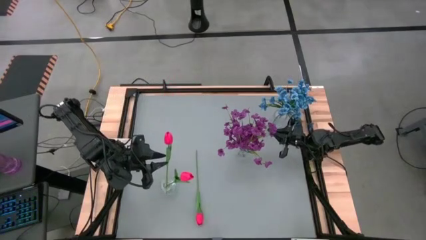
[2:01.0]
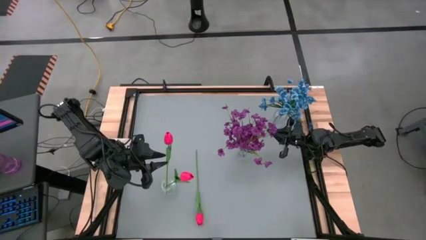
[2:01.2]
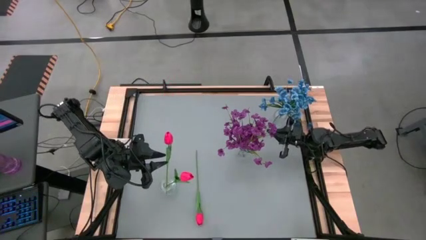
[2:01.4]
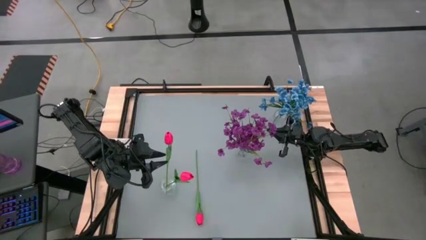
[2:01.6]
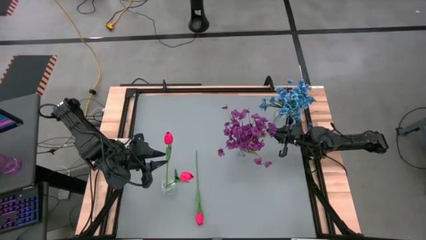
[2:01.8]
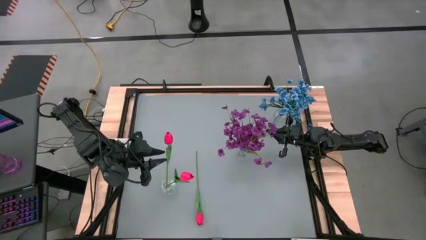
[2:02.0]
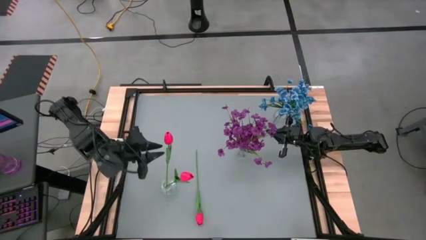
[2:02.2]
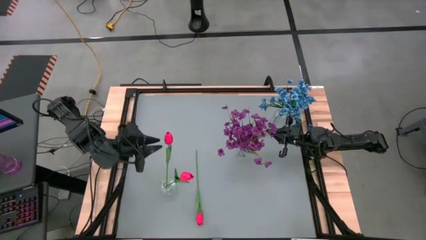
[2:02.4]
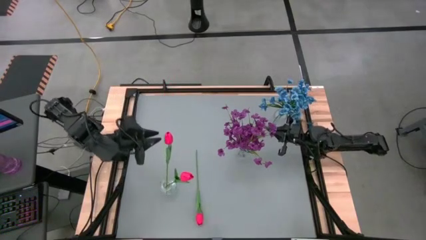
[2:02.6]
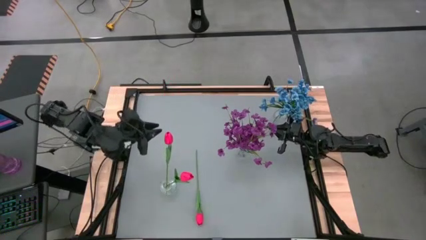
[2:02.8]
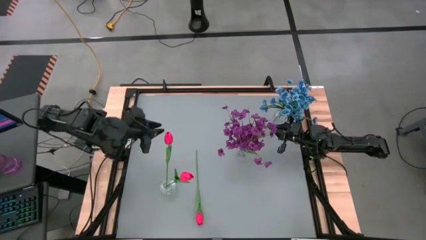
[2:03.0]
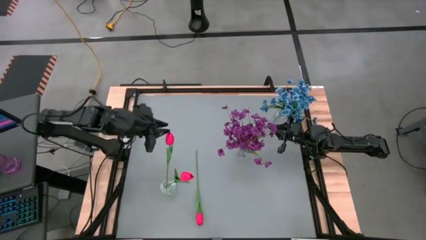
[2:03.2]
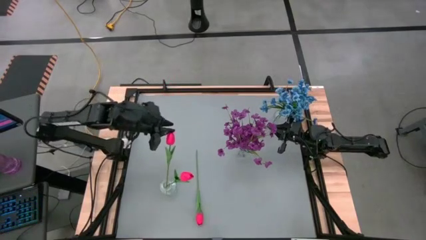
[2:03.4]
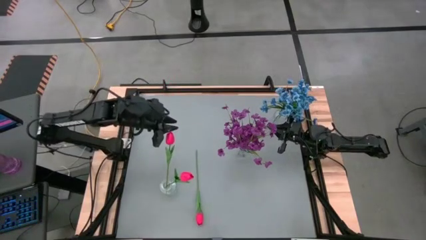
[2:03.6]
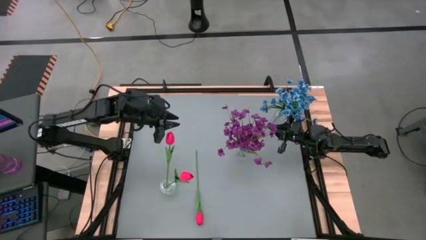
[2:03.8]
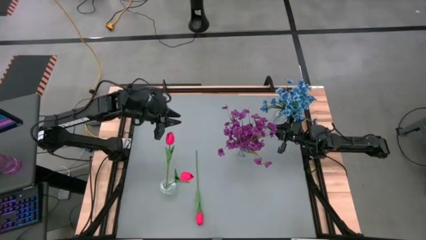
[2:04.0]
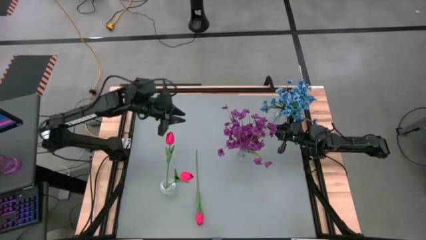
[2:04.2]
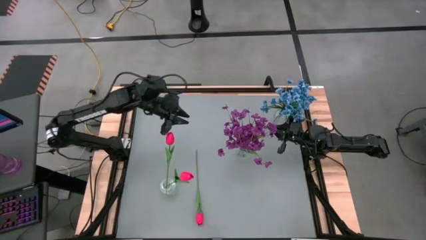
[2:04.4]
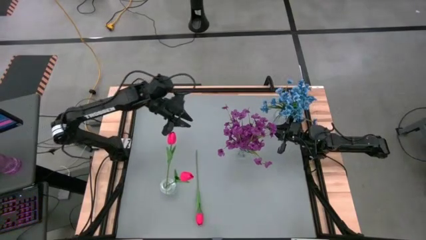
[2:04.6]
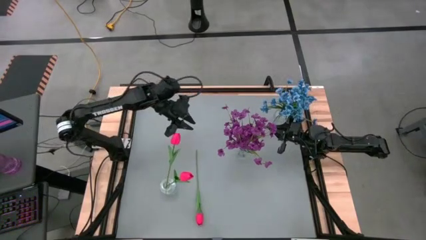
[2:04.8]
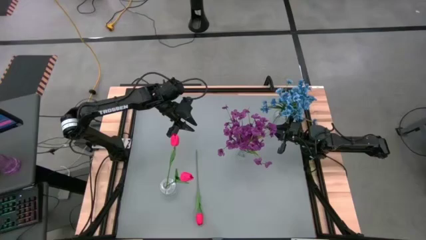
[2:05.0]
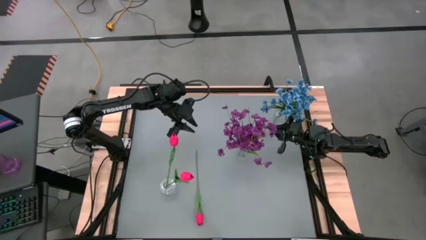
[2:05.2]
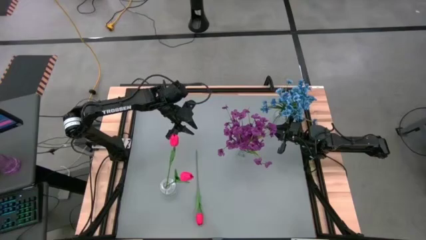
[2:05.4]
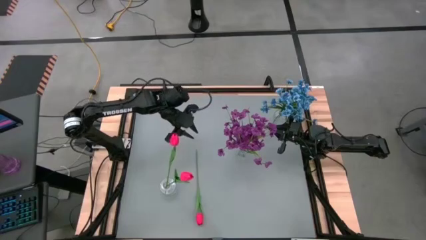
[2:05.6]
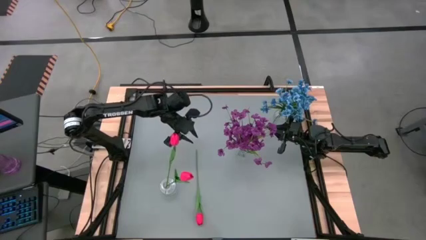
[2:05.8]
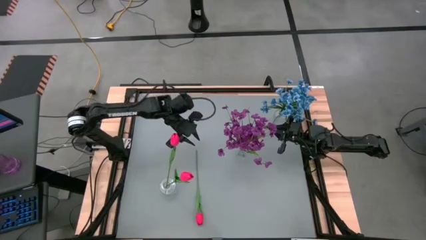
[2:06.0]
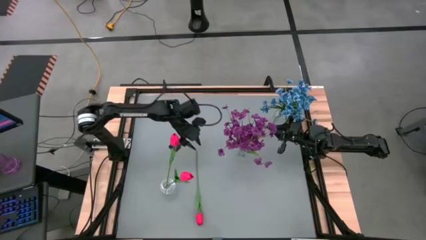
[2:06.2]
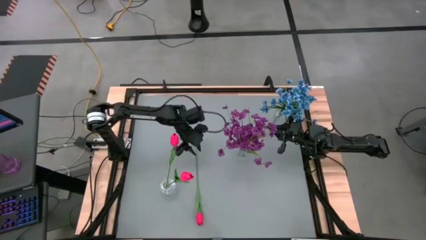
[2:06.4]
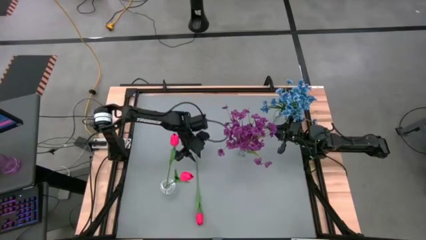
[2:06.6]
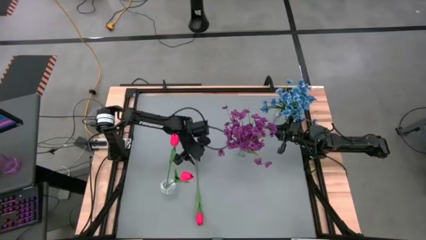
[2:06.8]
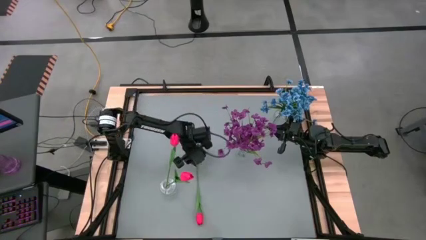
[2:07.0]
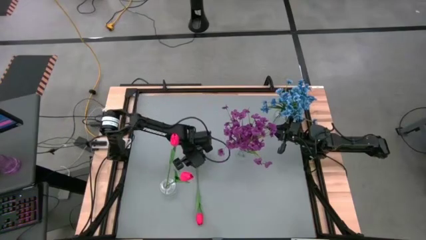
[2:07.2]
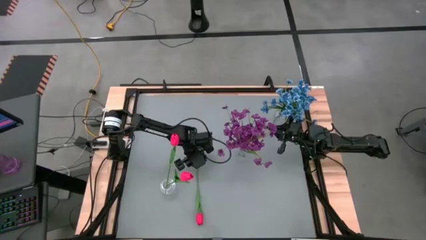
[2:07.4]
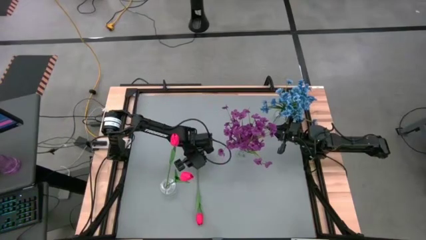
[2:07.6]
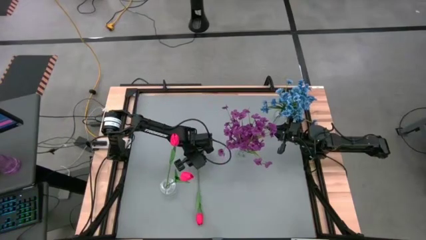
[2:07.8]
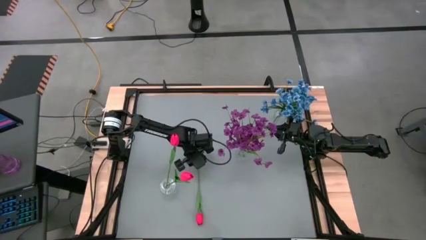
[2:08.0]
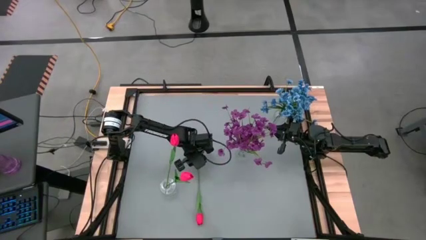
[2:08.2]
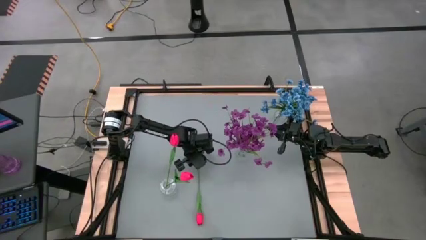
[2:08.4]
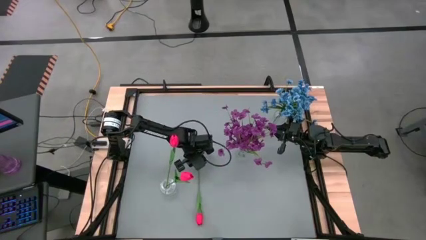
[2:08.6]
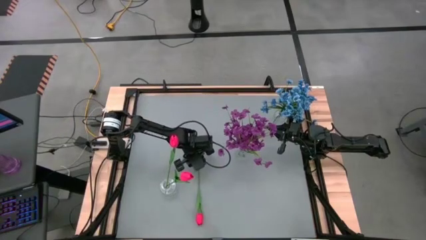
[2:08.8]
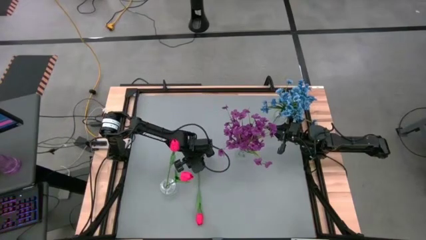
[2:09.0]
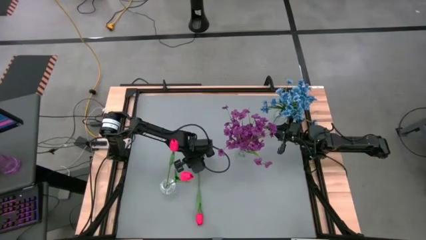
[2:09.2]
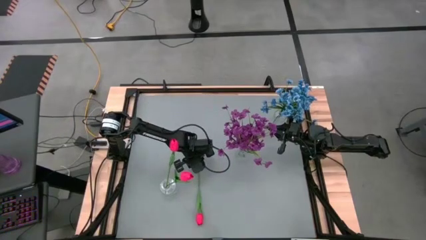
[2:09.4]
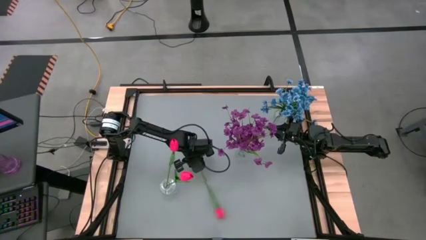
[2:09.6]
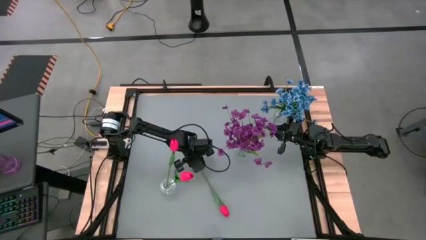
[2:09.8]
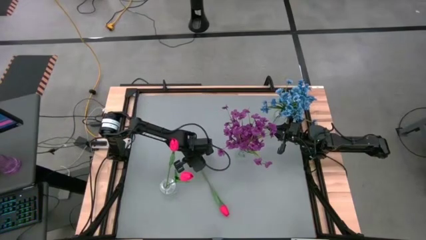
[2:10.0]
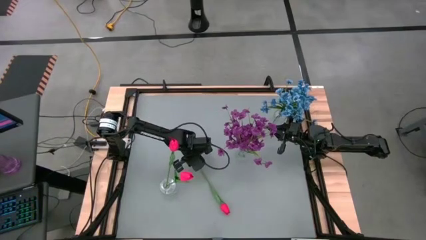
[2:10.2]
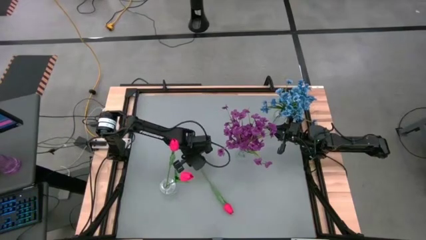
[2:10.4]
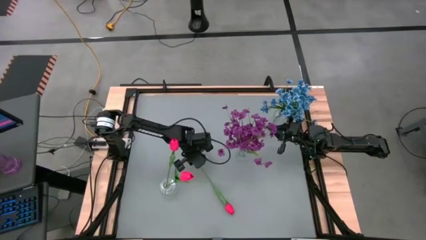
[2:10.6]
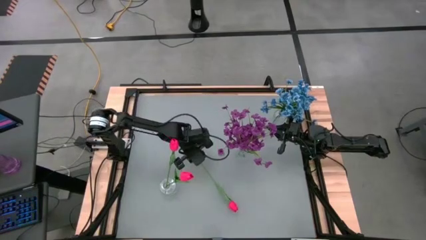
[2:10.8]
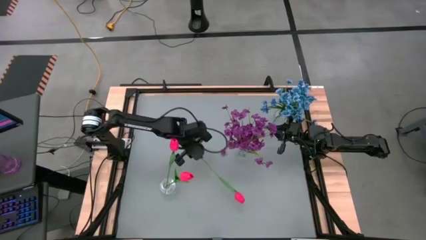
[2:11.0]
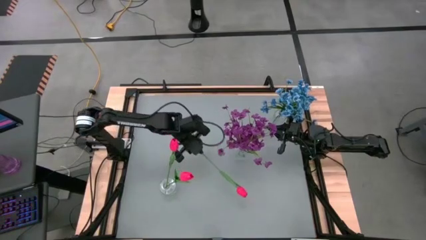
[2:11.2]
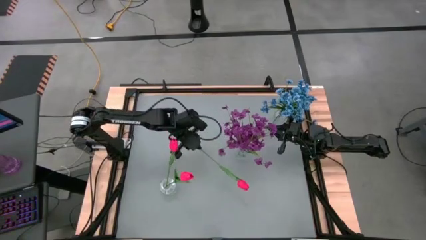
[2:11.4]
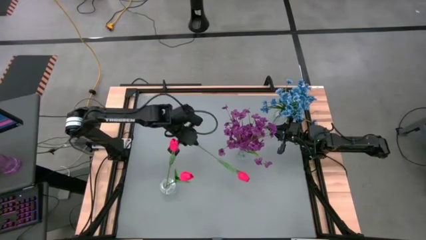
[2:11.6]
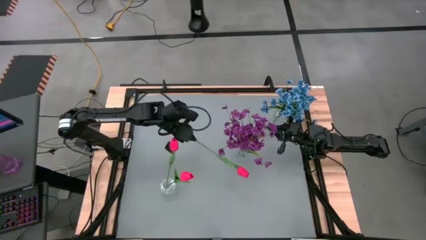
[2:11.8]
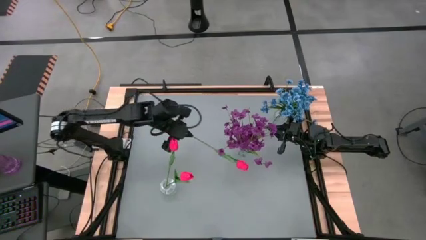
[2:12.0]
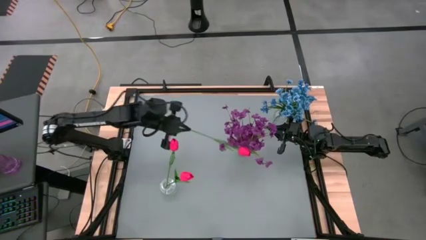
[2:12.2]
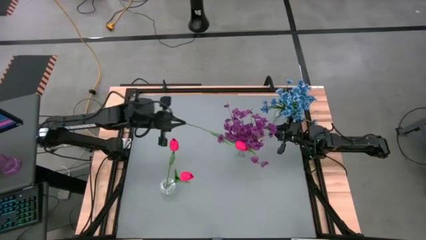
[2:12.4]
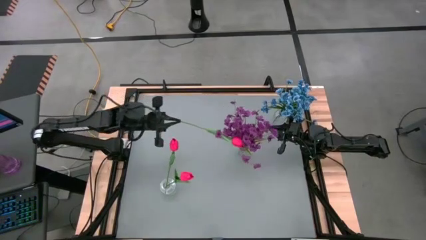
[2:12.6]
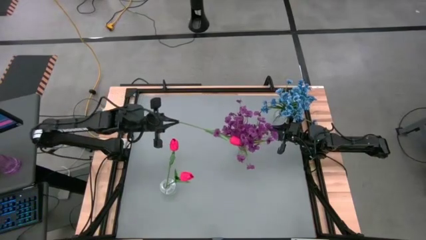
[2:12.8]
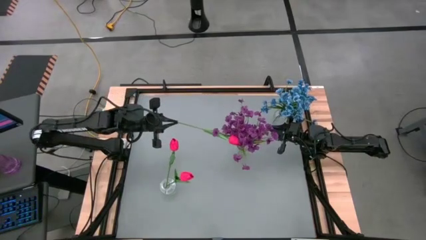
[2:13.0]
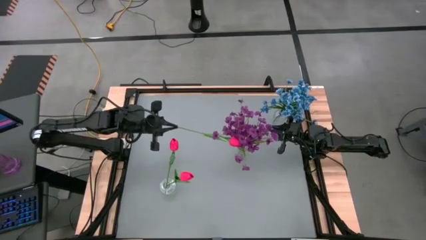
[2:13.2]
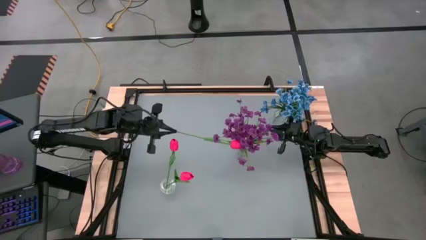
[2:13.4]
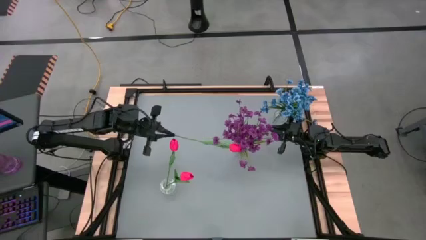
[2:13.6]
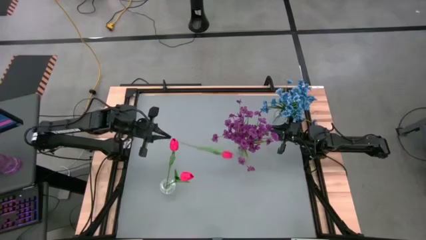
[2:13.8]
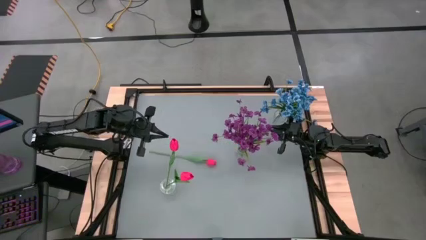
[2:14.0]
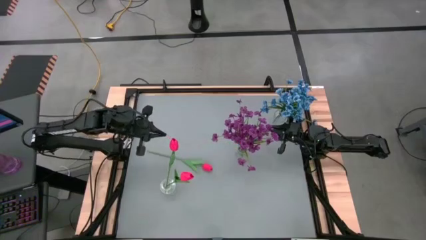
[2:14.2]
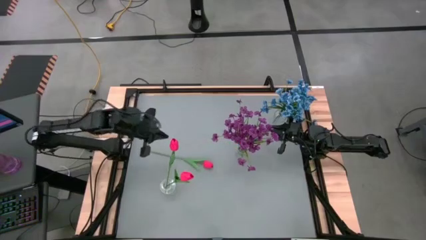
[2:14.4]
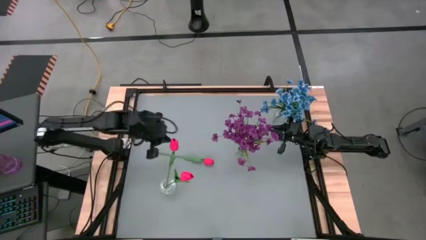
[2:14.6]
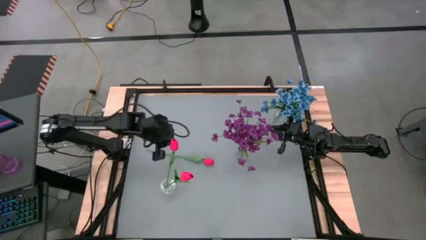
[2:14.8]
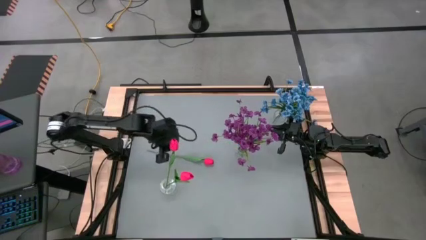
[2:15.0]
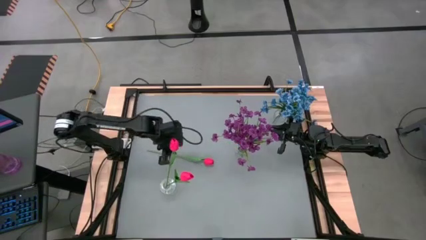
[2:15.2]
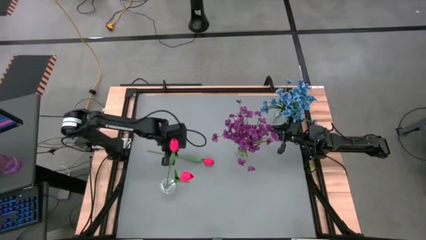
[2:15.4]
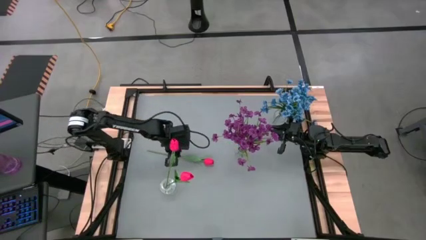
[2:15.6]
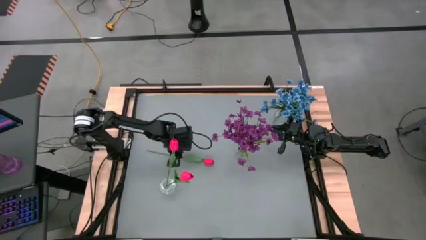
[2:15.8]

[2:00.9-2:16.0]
Task: Sort flowers into vase by color
Put the pink tulip into the bottom transparent vase
